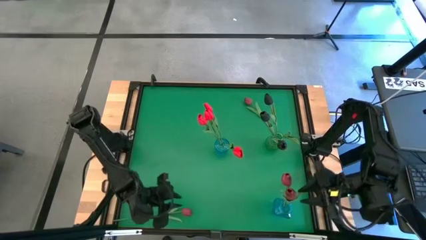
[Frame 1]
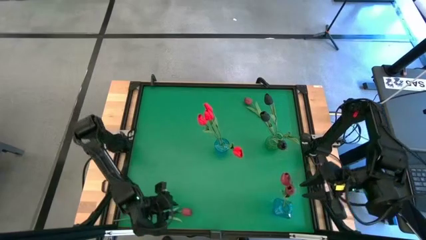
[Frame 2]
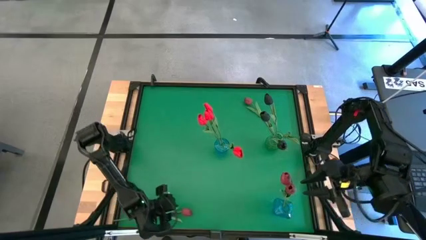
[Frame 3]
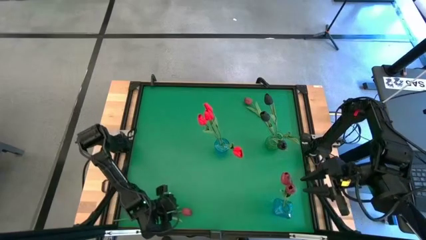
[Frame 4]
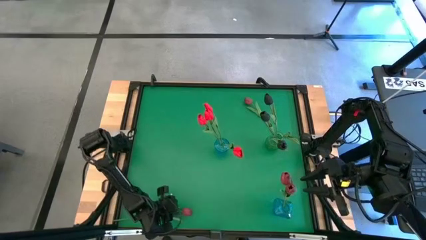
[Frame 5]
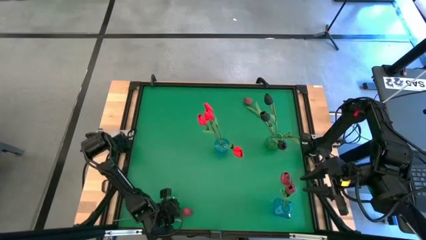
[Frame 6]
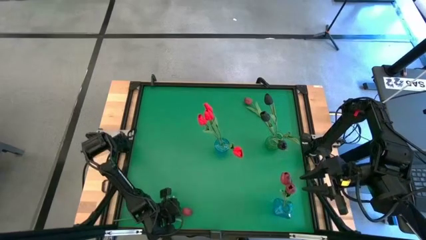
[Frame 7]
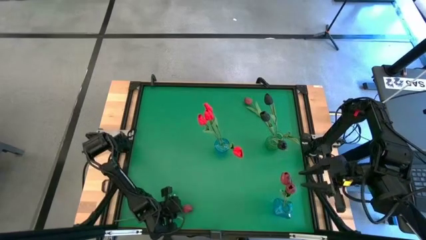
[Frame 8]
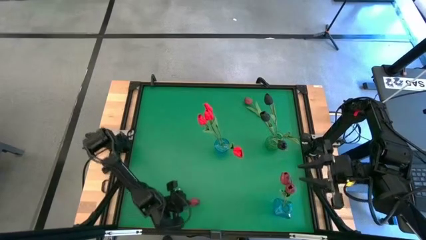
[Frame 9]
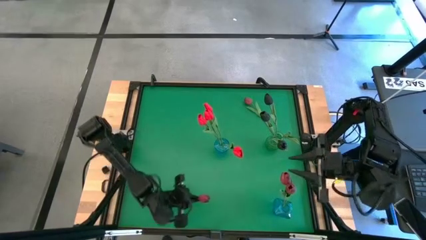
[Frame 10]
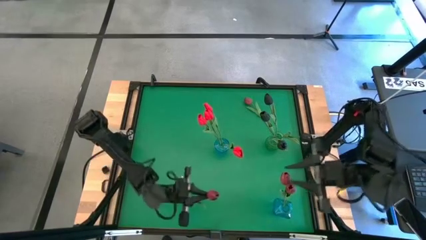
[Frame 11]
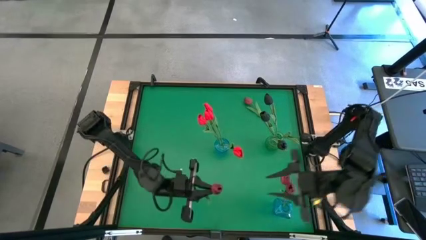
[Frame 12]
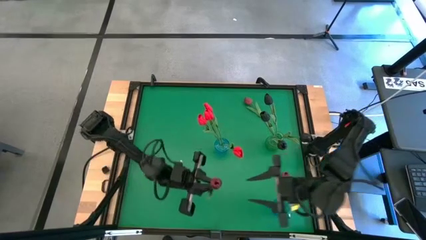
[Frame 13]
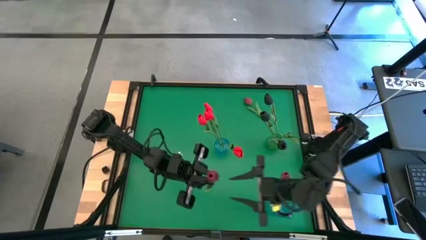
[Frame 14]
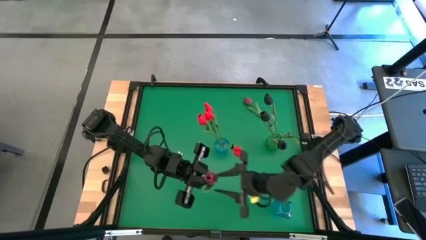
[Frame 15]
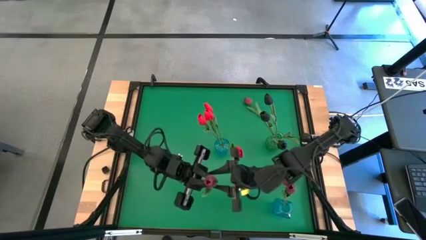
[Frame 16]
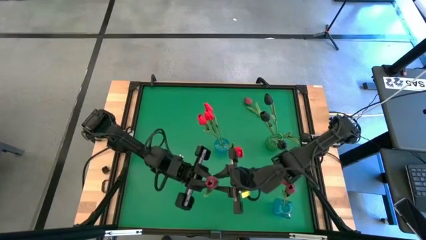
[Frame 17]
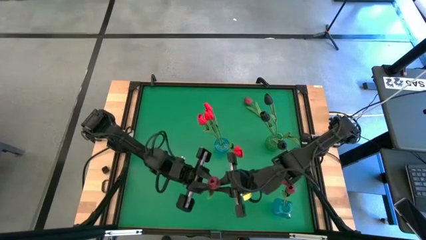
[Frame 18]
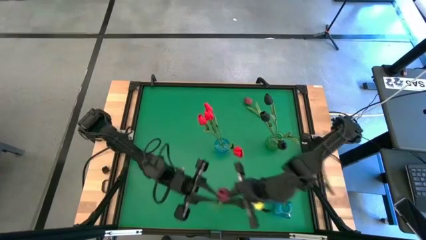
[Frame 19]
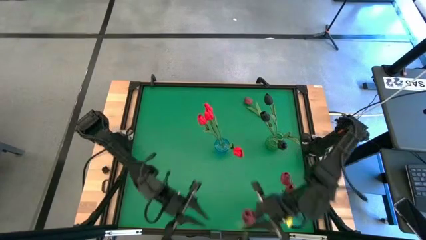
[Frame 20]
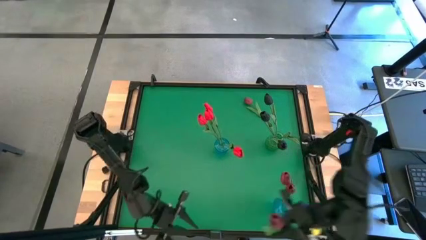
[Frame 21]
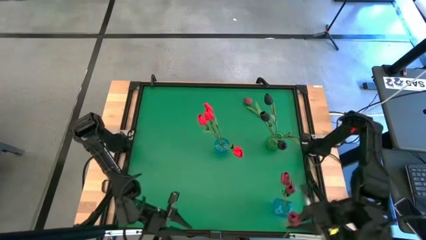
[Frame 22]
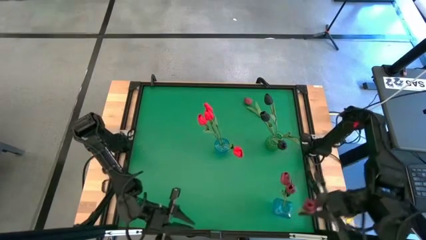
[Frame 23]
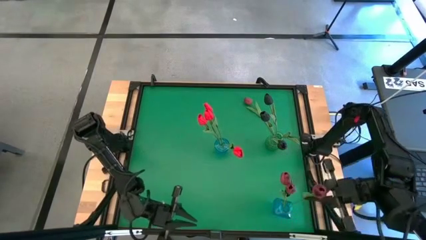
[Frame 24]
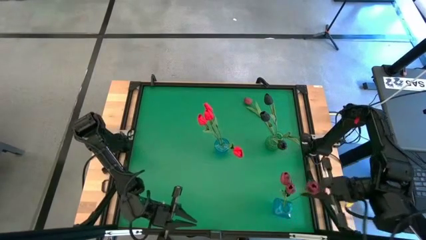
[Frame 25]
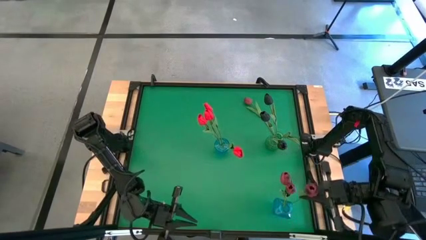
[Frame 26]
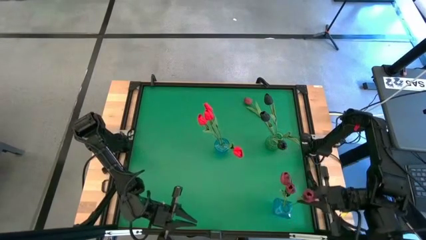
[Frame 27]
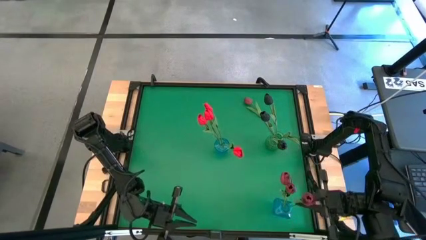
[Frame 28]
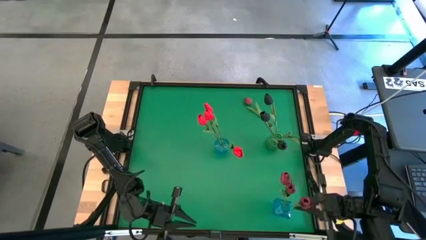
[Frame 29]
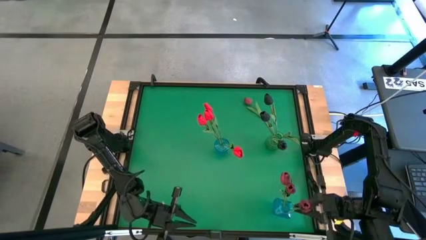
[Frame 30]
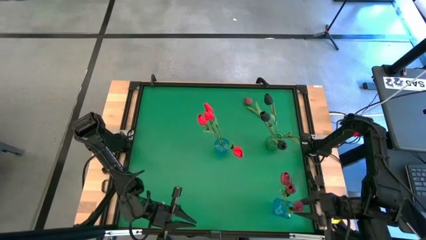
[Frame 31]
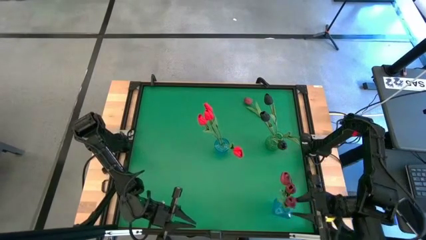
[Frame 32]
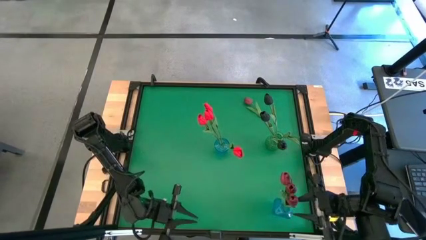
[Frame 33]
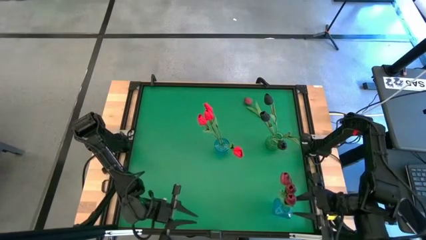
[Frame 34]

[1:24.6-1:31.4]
Task: Sort flowers into vase by color
Put the dark red flower in the bottom blue vase

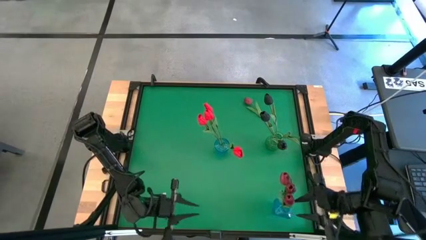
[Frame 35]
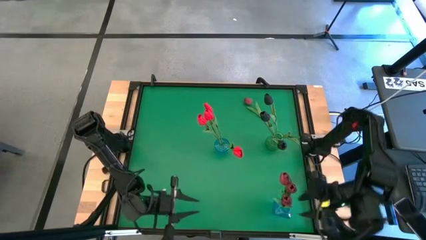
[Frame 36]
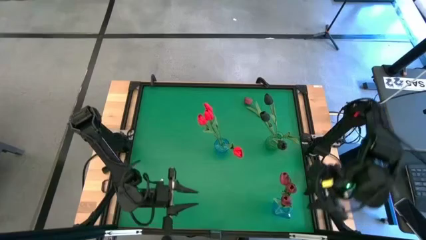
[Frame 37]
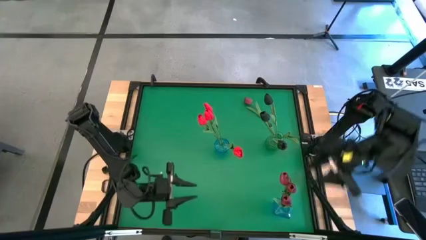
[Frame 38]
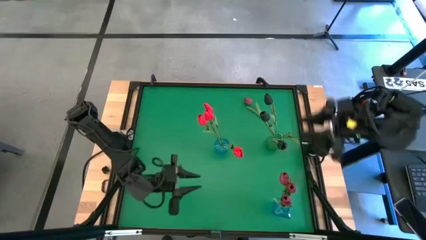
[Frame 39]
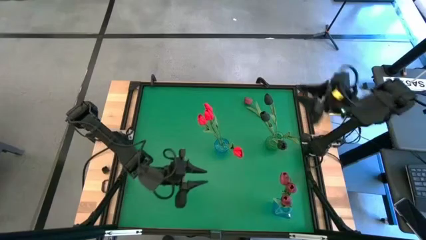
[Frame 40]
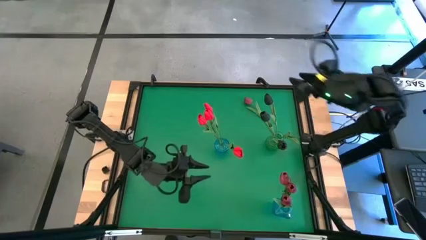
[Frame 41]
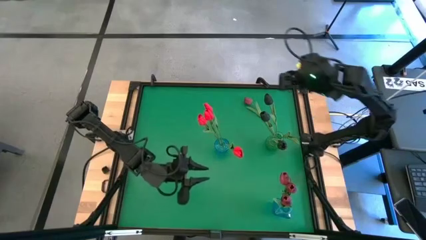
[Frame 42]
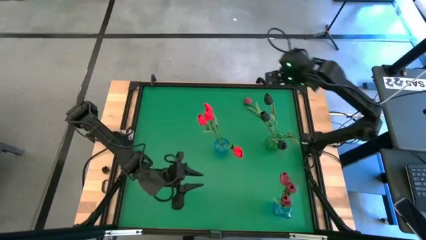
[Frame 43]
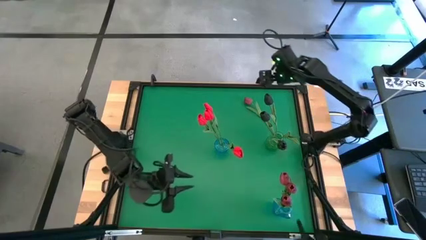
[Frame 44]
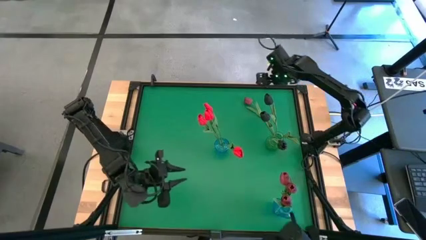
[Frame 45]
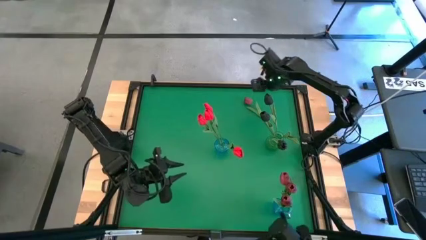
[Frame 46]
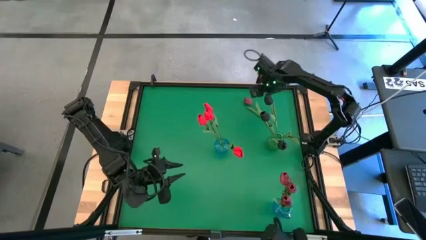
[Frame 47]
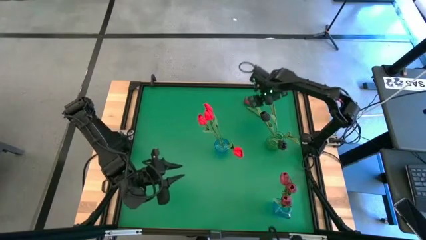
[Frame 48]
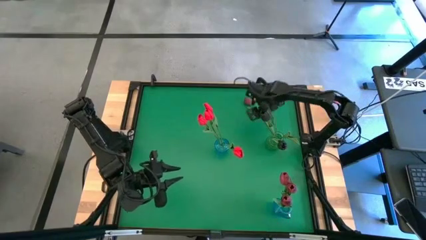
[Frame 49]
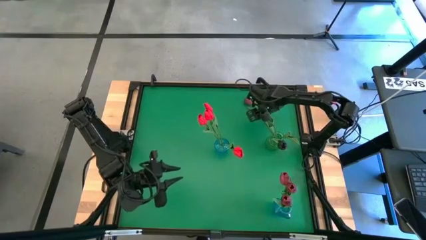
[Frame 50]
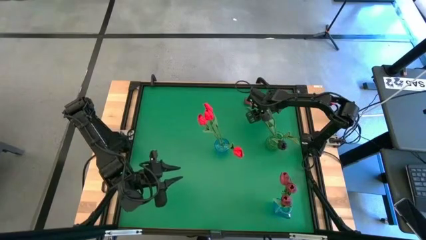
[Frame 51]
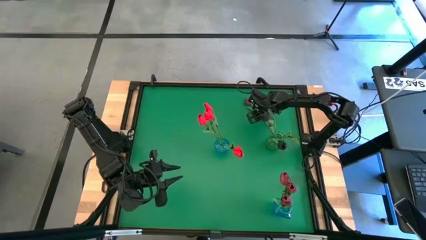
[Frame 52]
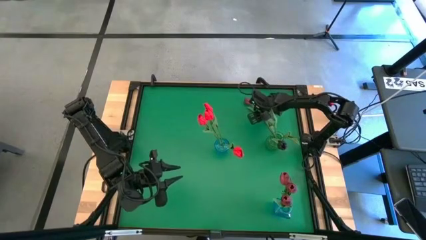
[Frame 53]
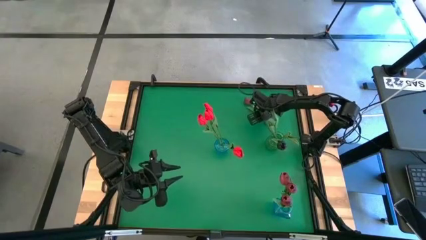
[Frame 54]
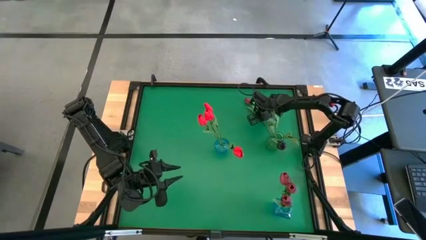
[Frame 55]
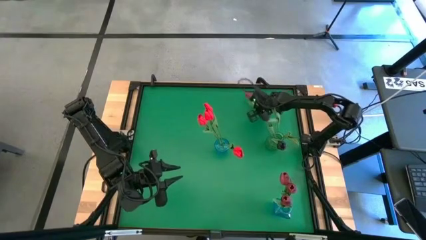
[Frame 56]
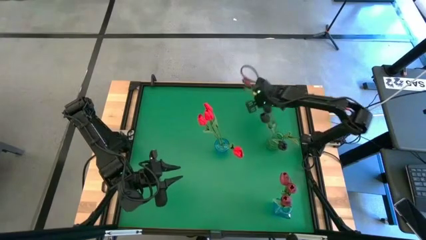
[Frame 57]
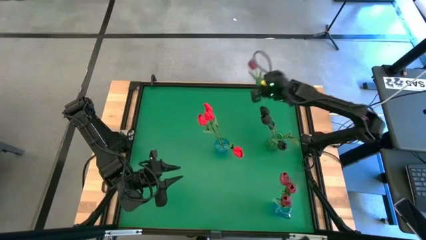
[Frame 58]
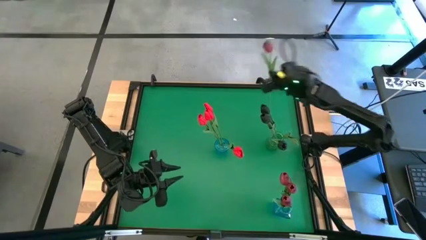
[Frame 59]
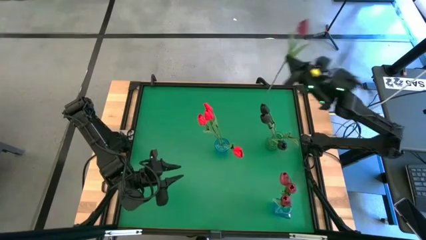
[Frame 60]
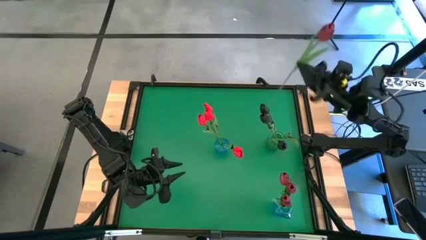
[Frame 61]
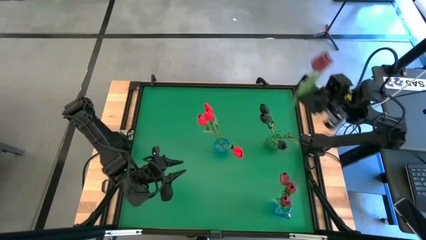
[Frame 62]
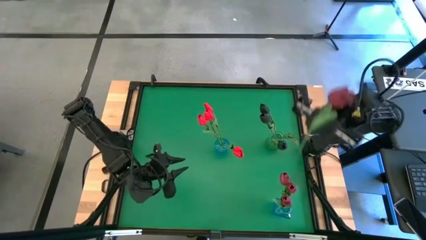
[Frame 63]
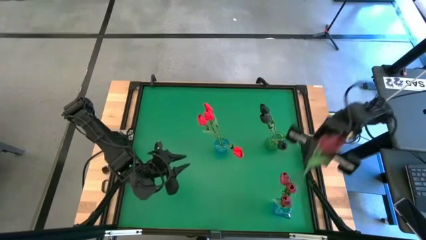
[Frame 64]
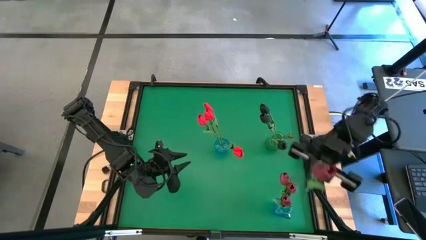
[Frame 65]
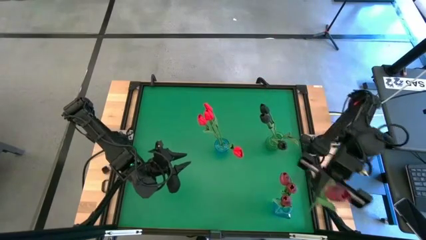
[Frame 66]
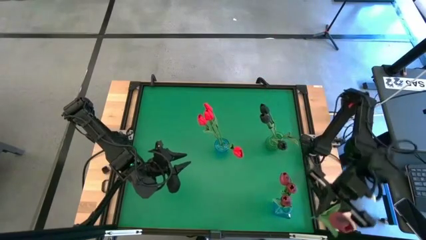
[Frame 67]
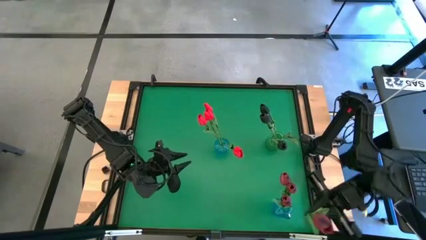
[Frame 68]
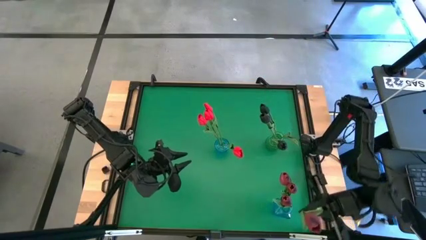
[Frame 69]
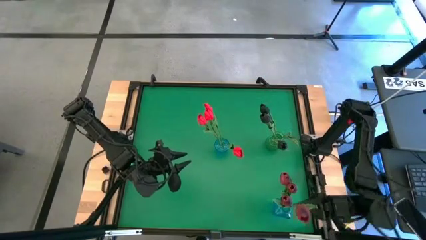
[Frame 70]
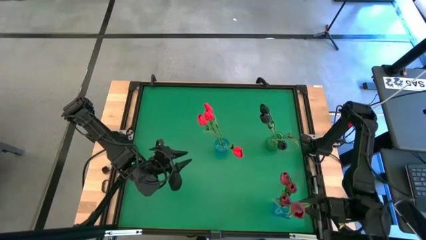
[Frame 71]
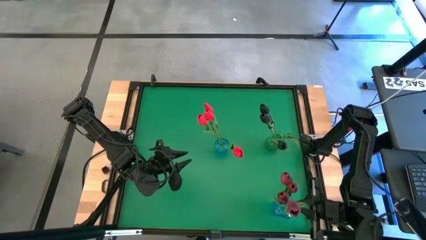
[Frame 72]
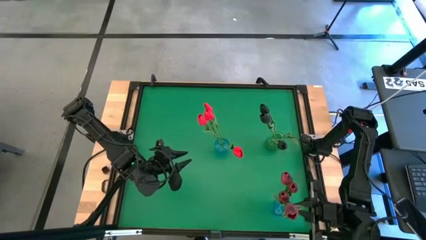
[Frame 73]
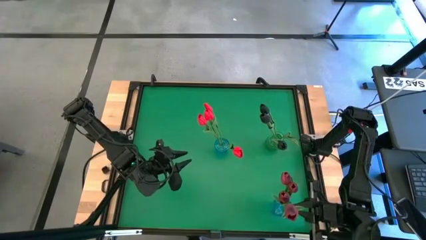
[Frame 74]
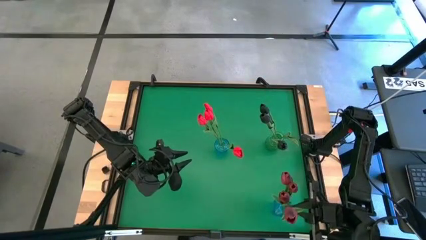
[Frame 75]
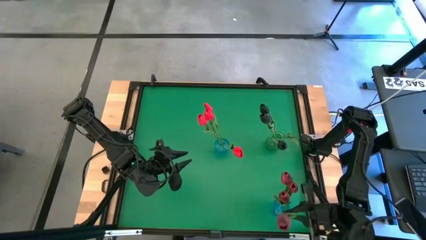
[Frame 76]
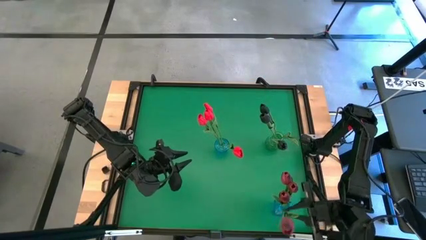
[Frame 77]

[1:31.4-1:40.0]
Put the dark red flower in the bottom blue vase
